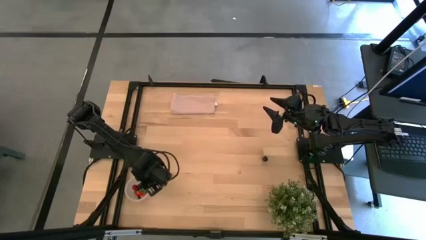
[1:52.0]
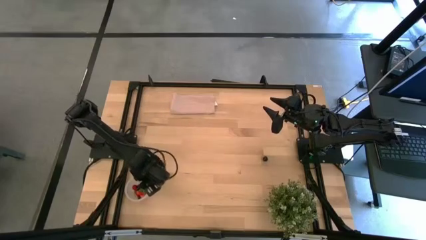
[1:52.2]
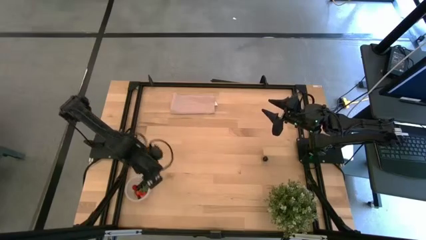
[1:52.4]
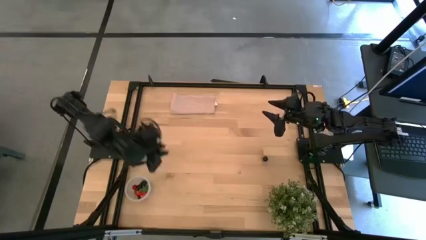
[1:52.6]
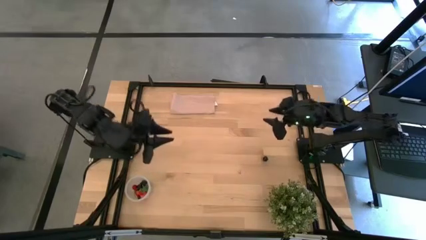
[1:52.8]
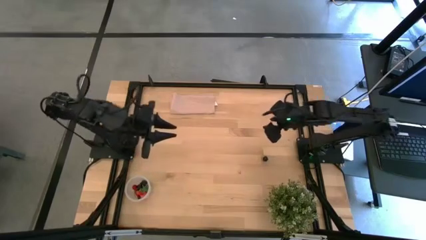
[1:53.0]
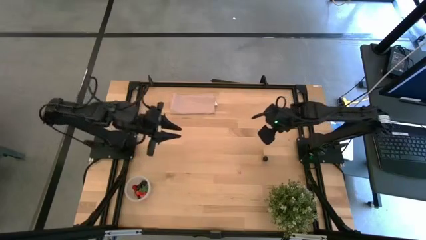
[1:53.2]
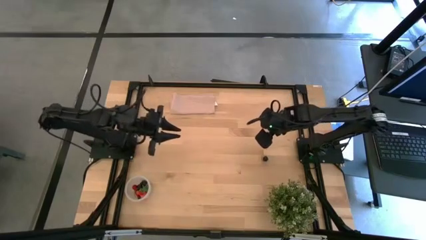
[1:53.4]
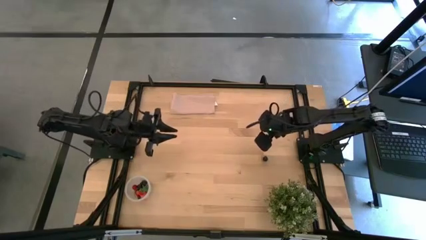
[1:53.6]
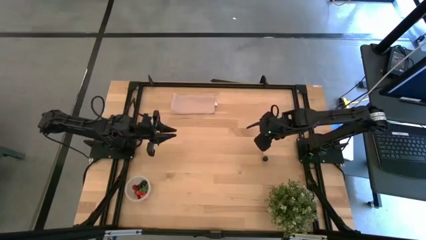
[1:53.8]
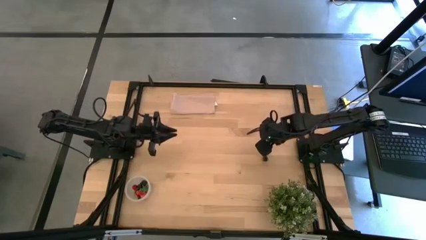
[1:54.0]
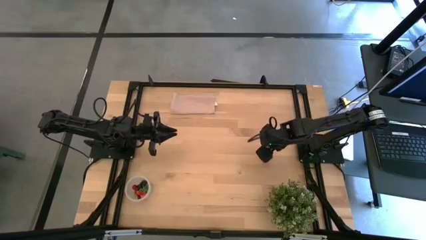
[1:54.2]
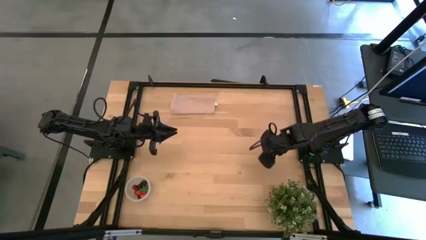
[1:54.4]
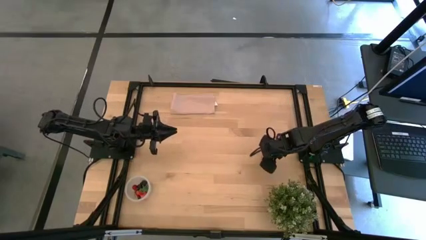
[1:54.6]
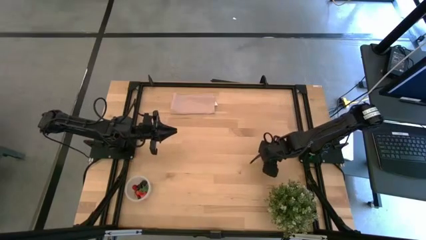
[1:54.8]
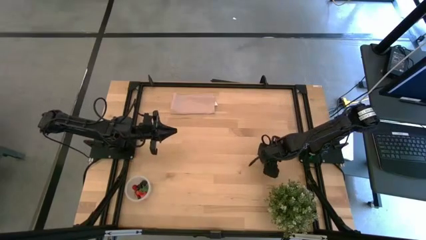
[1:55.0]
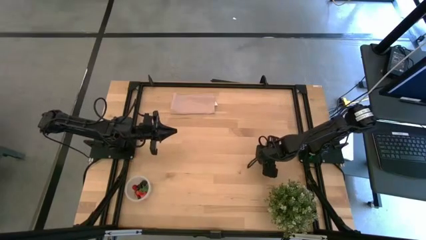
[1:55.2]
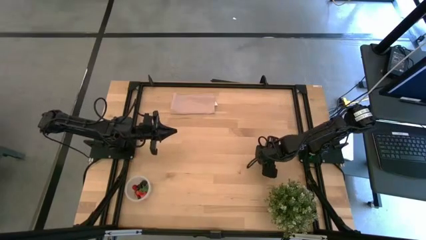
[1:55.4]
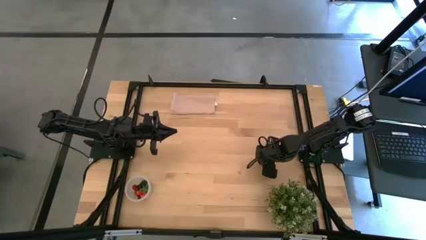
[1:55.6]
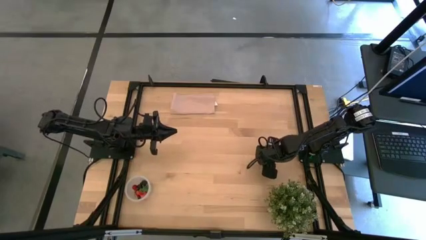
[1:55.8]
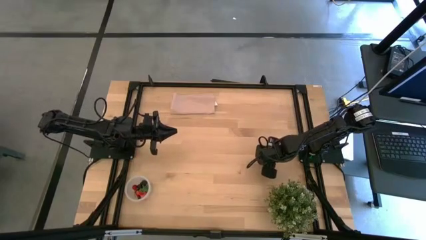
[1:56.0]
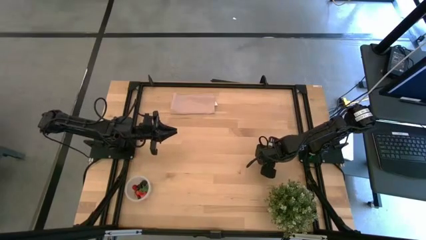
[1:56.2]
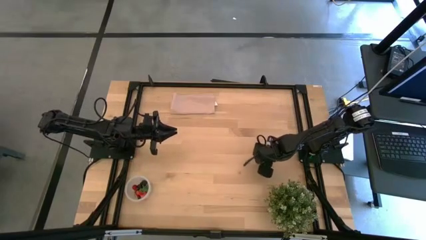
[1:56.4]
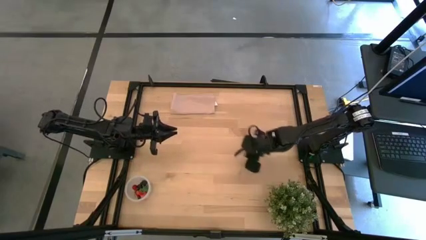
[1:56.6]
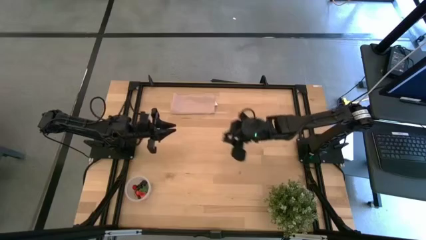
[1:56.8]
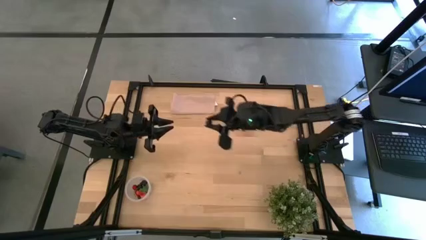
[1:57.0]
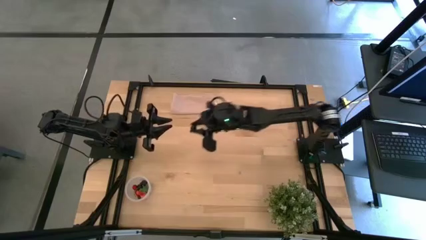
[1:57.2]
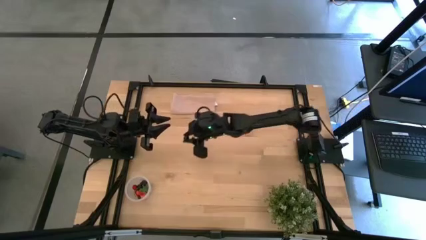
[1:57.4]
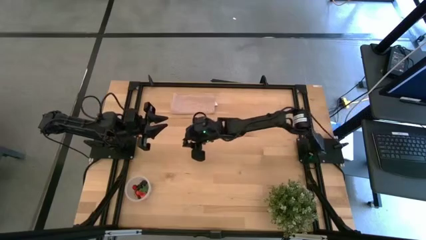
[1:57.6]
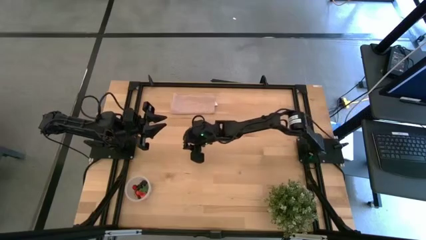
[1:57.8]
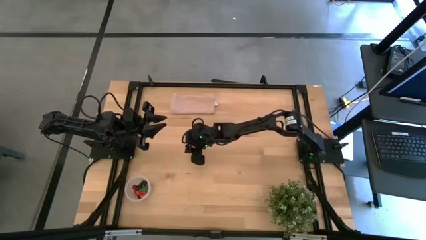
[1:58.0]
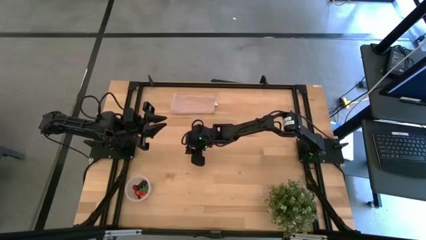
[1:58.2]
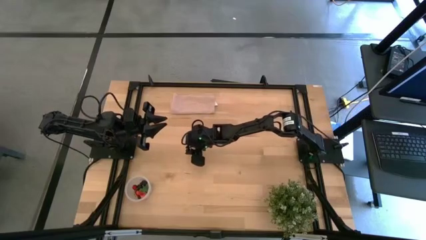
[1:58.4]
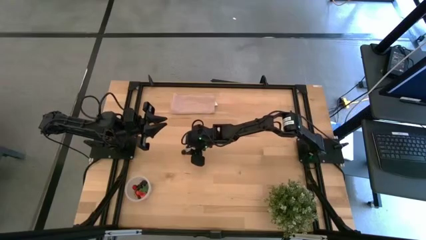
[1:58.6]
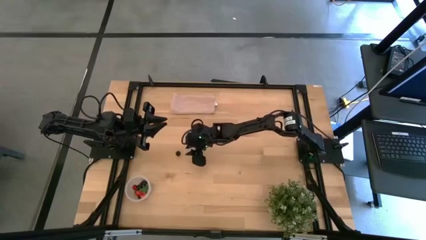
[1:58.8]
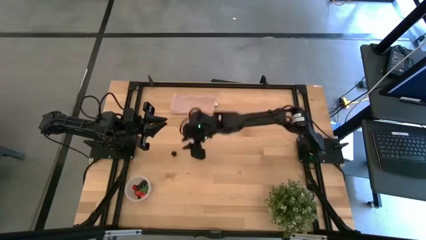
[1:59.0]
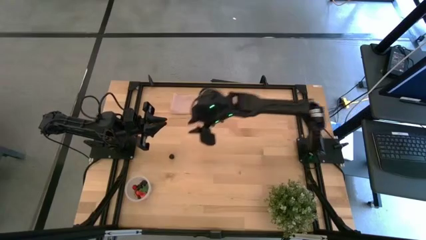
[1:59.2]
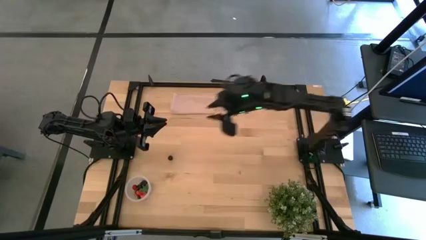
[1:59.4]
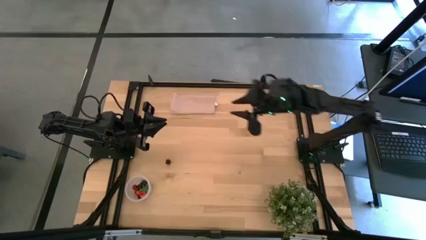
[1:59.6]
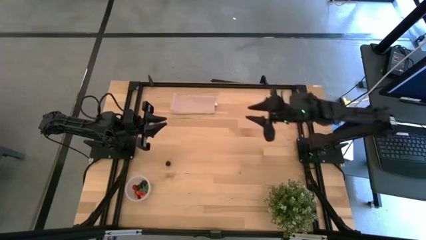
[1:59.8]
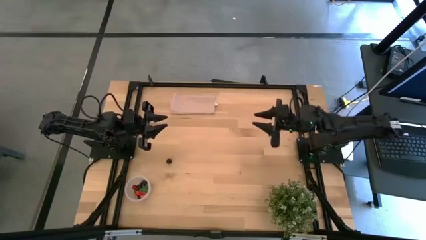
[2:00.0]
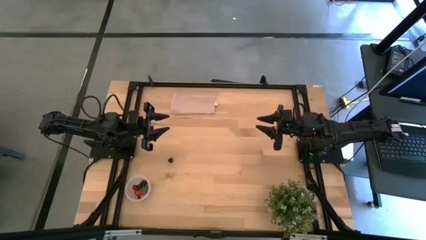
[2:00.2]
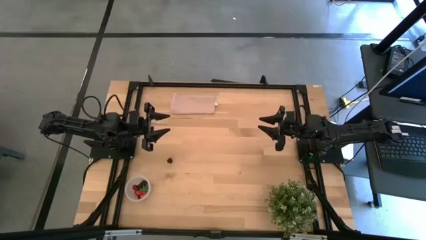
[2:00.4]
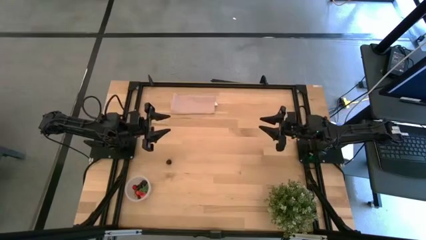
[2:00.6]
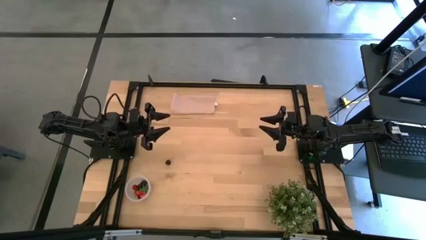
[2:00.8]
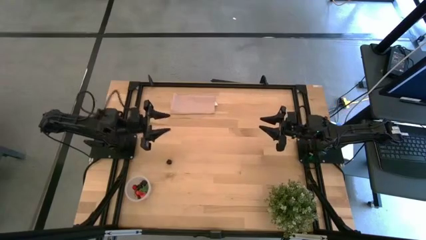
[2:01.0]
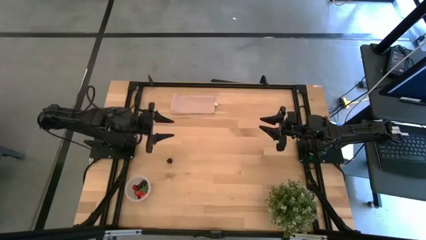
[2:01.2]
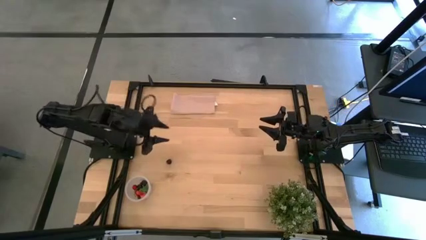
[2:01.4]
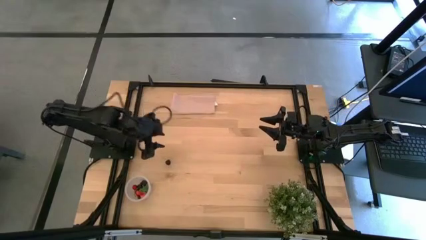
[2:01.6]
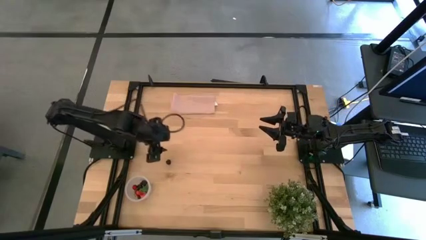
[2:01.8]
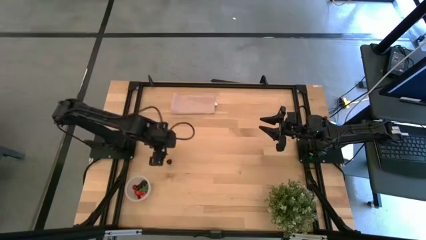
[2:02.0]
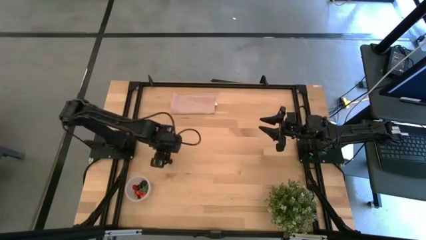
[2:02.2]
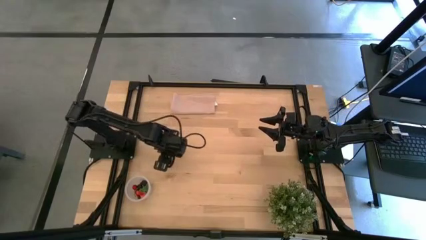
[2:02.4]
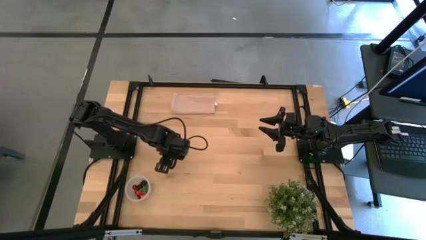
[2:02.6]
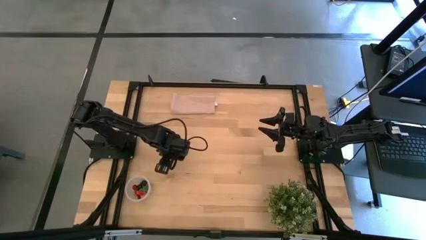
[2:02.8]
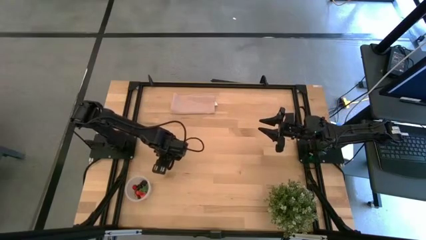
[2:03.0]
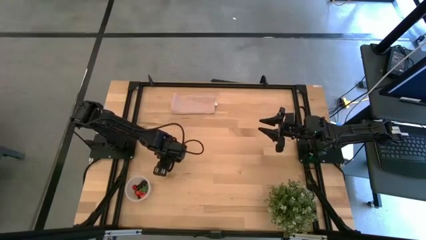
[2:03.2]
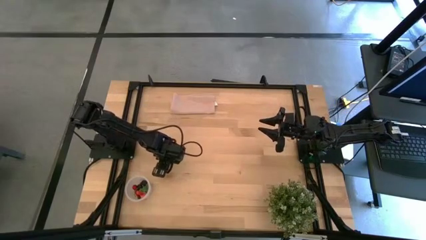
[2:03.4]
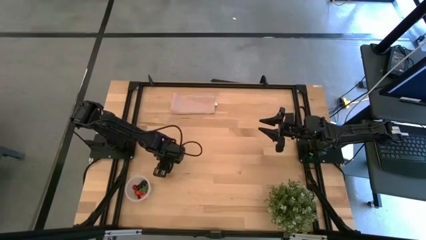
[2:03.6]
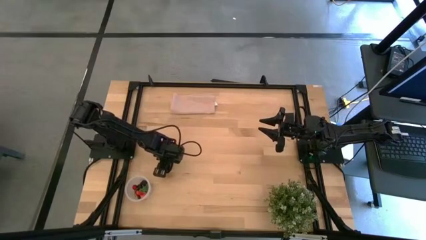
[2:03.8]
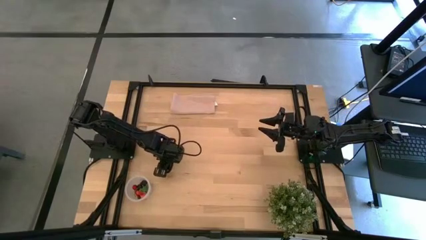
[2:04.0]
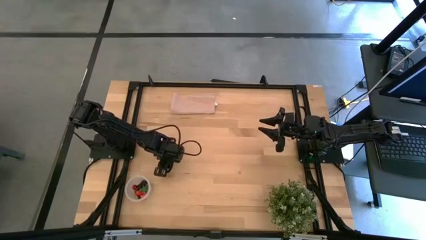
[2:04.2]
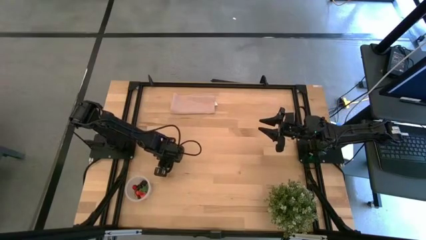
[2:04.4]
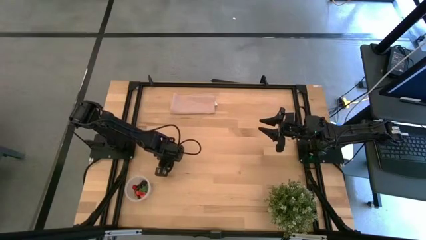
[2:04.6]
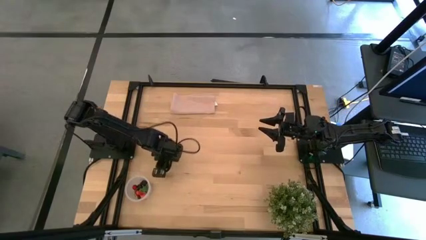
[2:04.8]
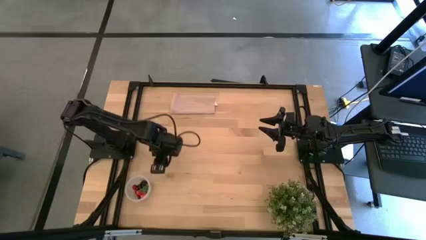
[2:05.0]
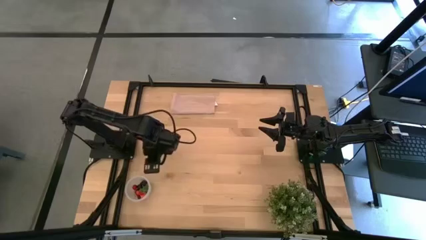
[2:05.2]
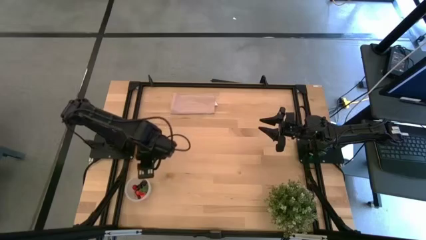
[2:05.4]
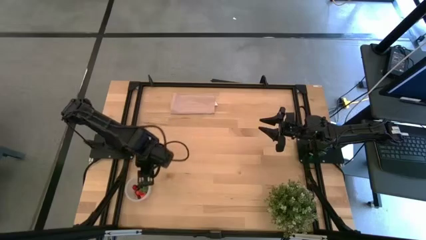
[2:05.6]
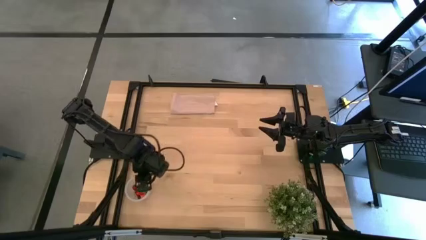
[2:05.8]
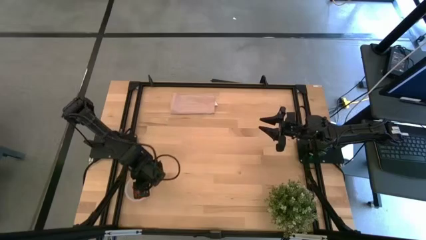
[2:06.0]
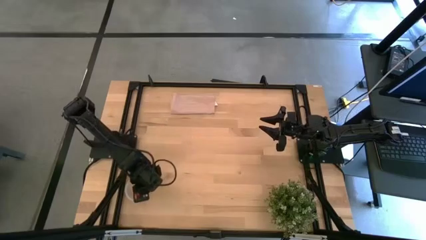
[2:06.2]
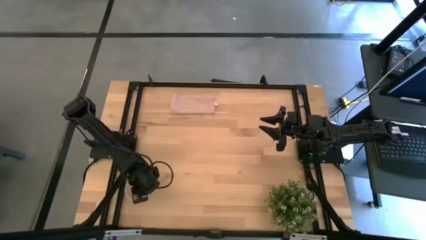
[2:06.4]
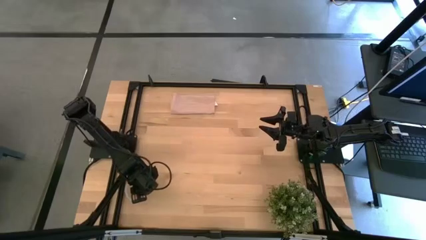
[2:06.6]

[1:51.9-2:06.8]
Task: Pick and placing Produce into tupperware
Put the black cherry into the transparent bin
